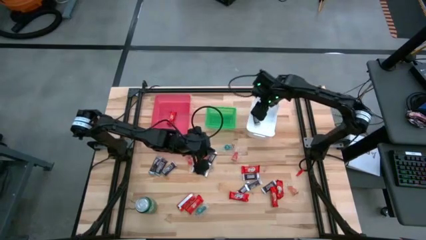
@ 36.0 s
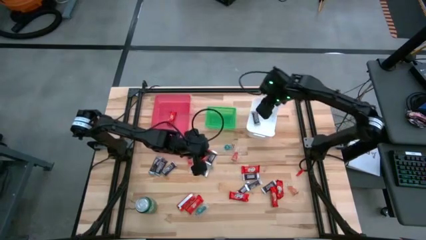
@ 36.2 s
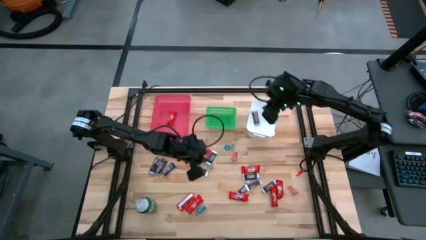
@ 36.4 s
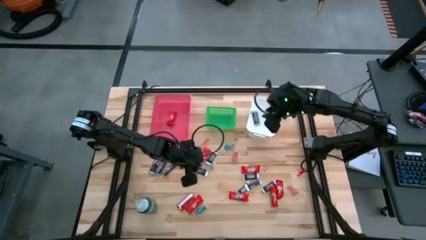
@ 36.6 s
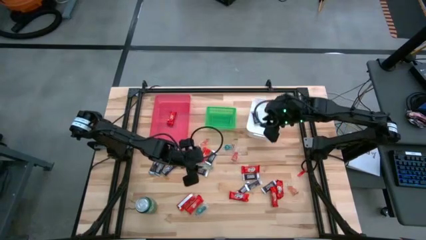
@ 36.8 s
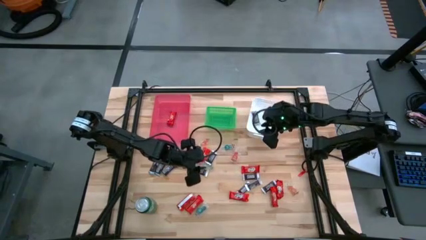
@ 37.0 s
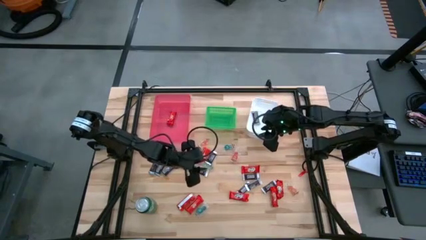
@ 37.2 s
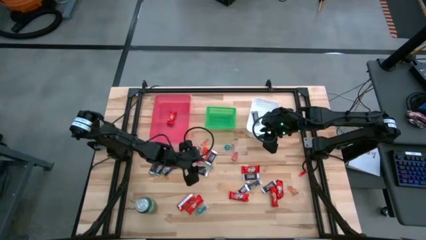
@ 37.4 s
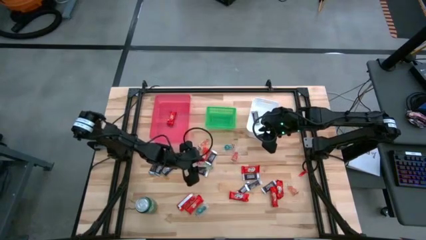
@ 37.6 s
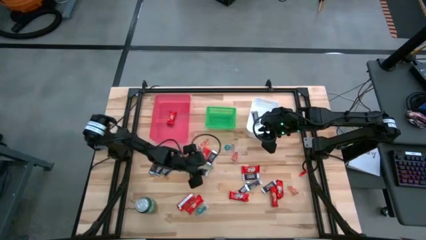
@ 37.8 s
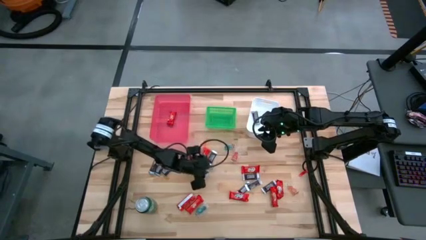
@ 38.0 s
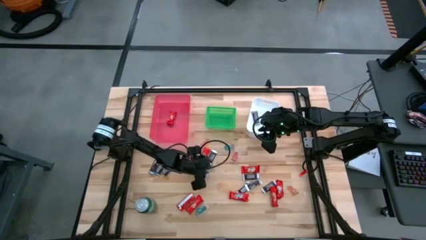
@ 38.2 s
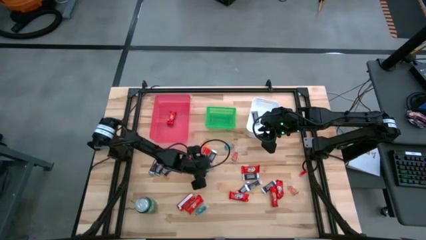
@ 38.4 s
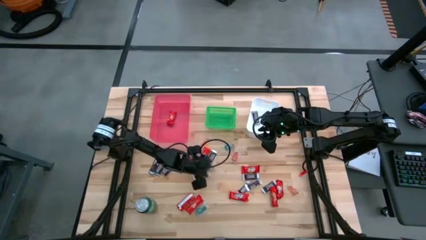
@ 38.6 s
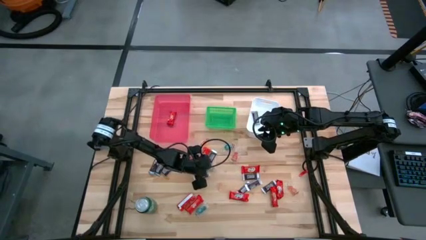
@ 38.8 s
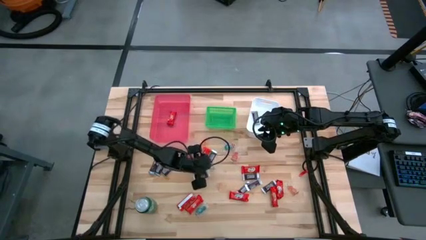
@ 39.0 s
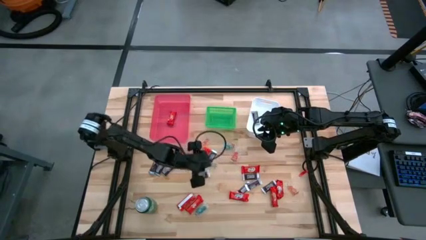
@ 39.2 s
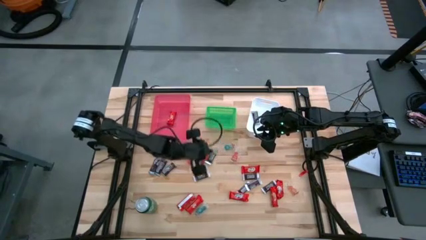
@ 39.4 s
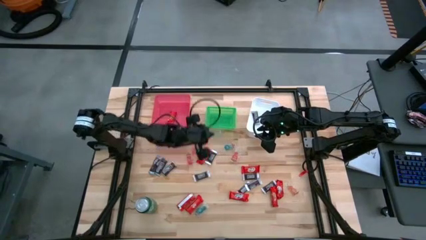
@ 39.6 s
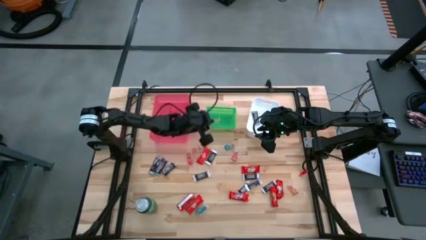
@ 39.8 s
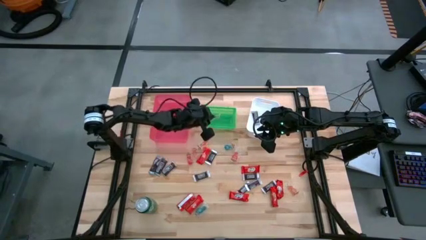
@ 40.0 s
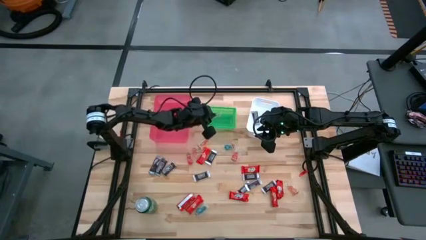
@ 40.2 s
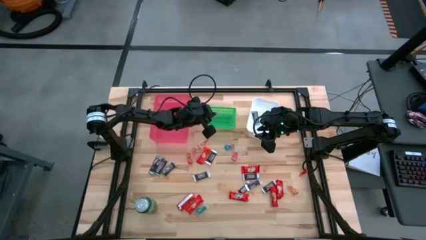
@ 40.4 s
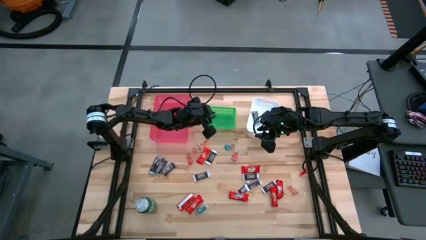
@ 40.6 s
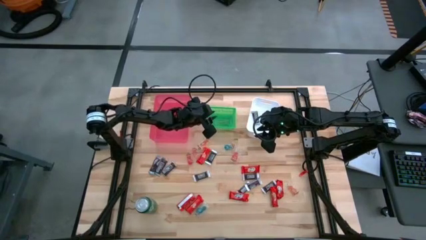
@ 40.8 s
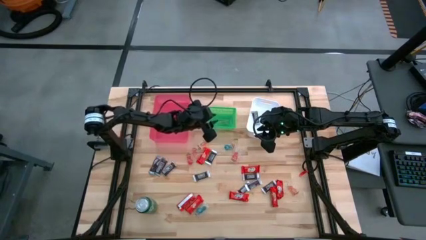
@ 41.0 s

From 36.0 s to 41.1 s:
Task: Sort candy
Put the green gummy into the green bin

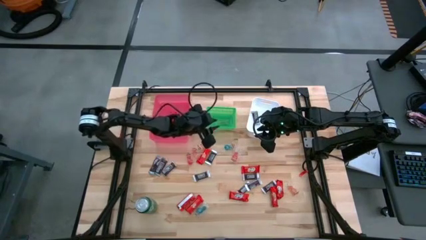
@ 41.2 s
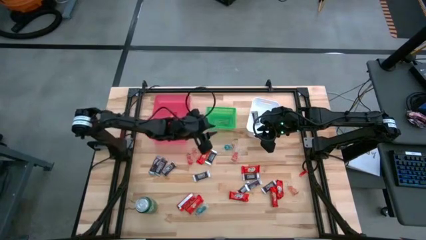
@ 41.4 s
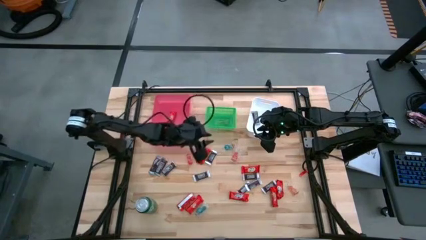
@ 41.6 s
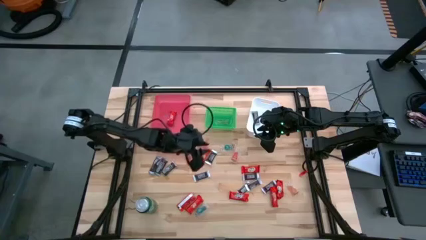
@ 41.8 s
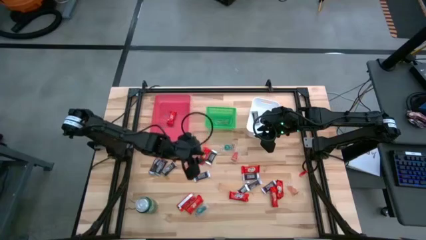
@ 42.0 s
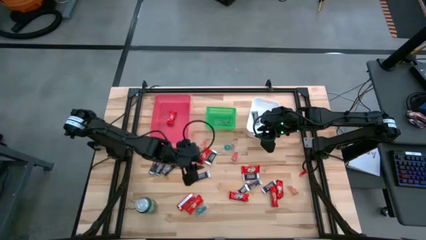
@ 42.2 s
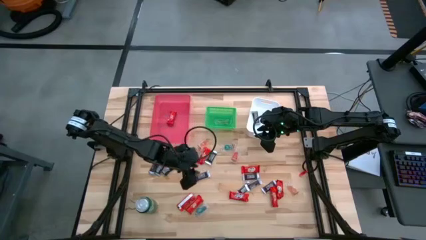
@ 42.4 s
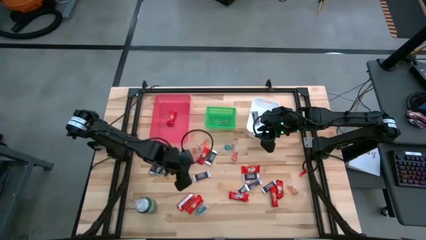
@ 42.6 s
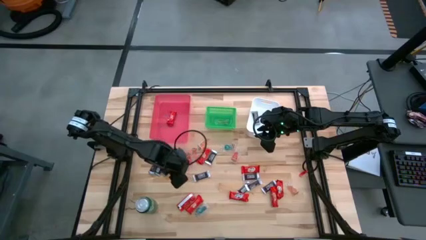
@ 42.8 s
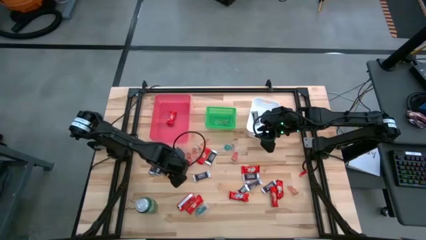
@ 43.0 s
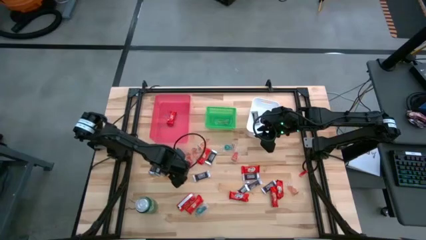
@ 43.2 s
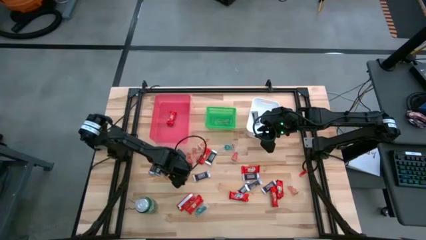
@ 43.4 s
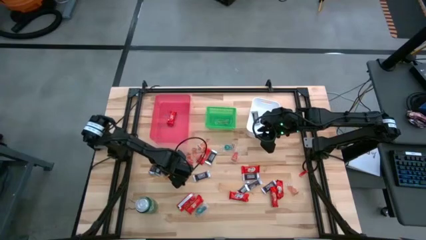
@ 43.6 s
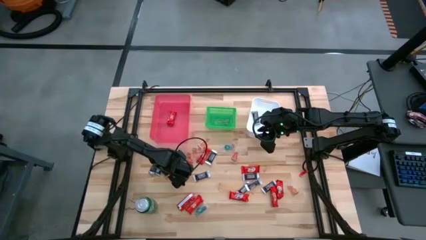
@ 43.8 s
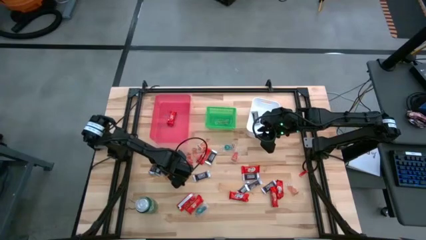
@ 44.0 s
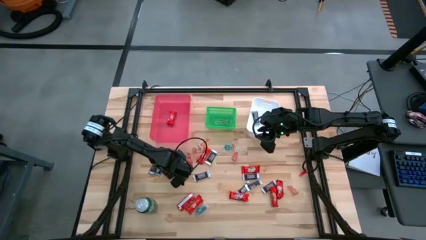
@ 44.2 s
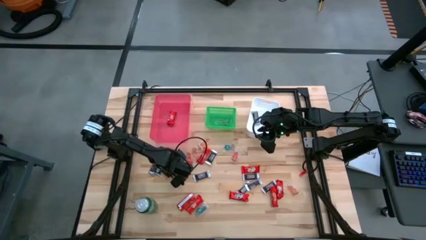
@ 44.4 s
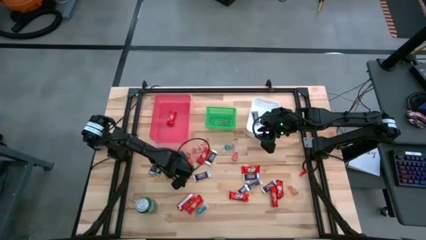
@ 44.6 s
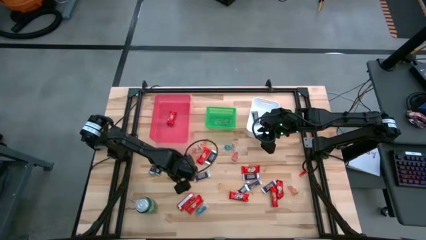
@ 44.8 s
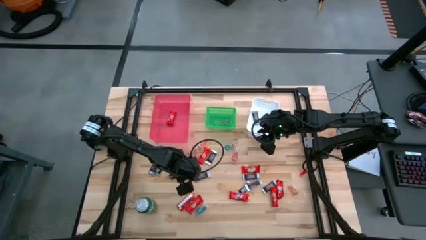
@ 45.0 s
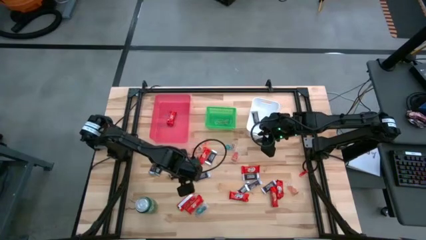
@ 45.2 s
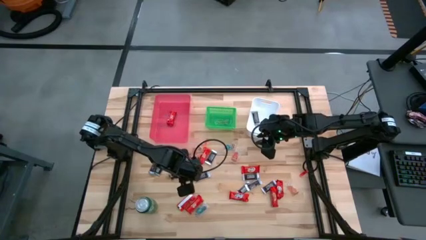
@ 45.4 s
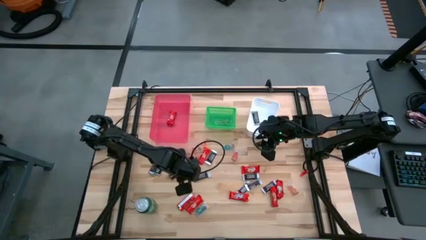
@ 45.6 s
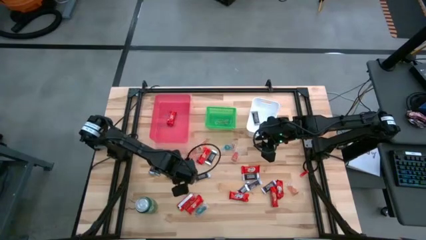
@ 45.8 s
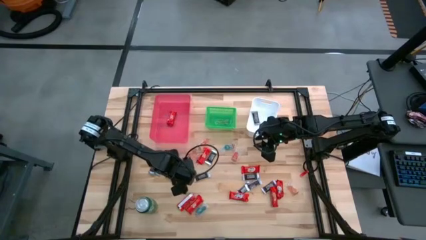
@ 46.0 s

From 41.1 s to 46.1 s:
Put the brown chocolate bar into the white bin

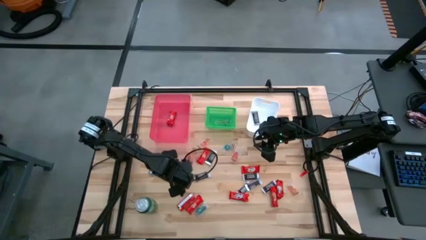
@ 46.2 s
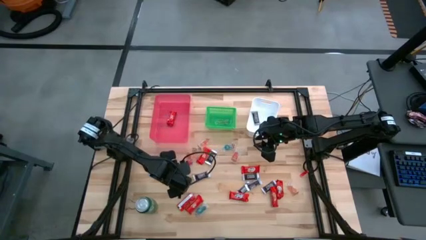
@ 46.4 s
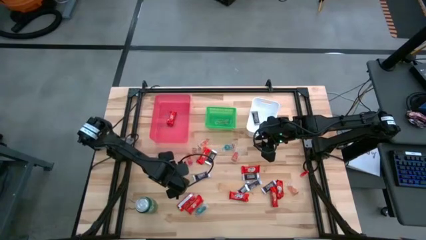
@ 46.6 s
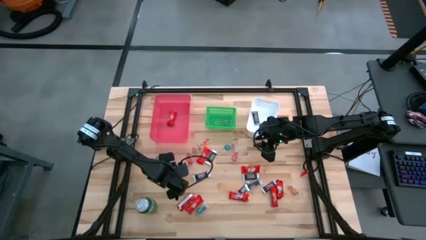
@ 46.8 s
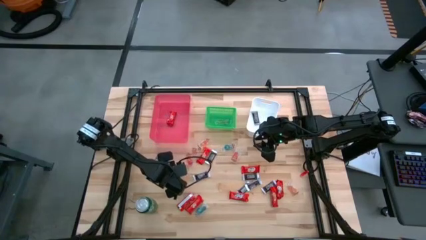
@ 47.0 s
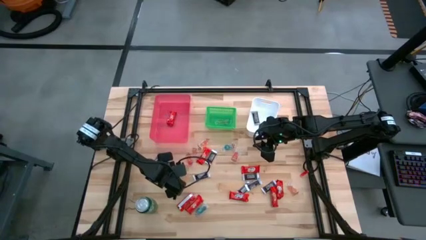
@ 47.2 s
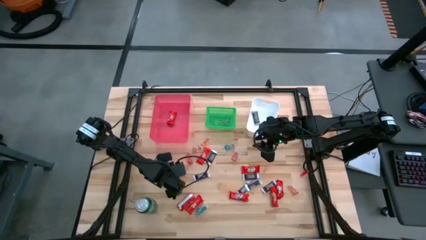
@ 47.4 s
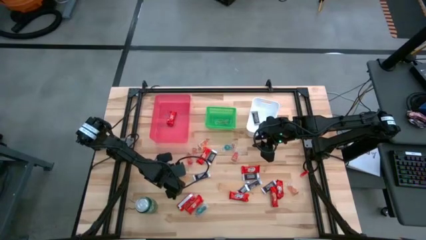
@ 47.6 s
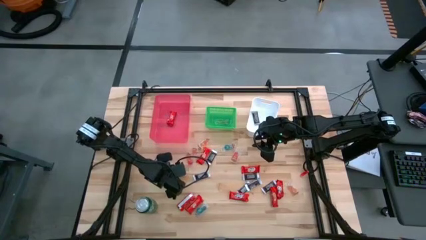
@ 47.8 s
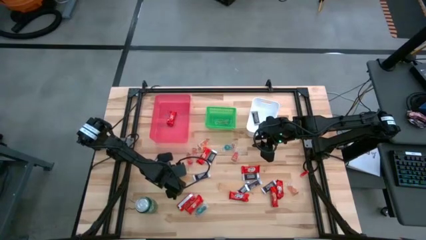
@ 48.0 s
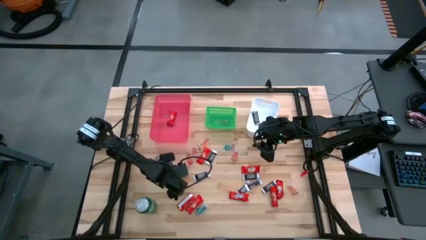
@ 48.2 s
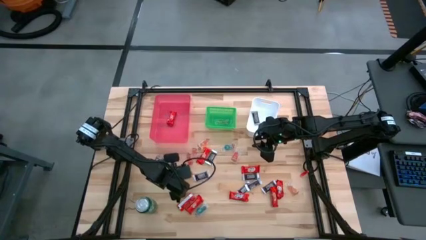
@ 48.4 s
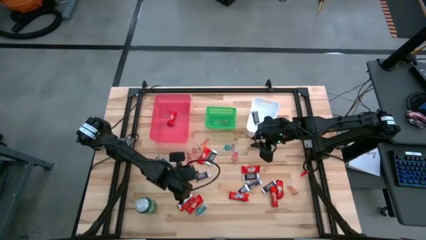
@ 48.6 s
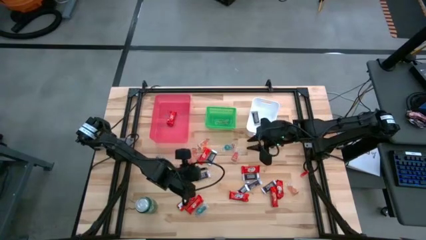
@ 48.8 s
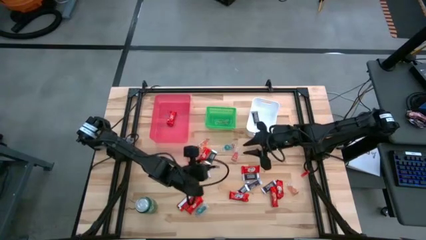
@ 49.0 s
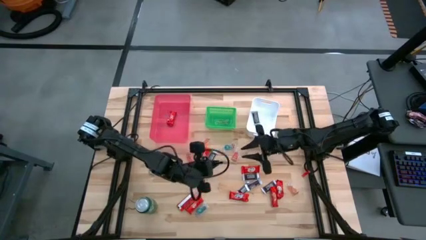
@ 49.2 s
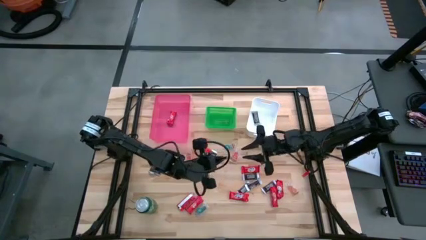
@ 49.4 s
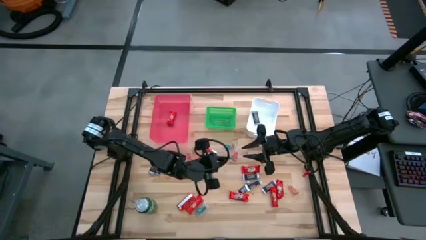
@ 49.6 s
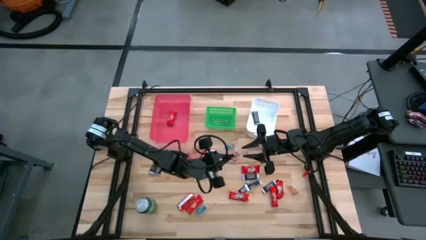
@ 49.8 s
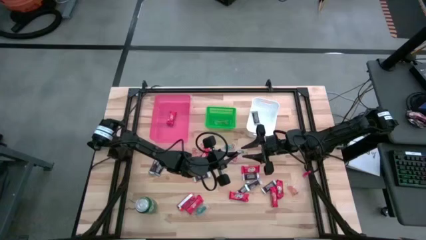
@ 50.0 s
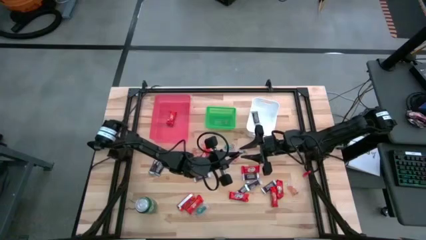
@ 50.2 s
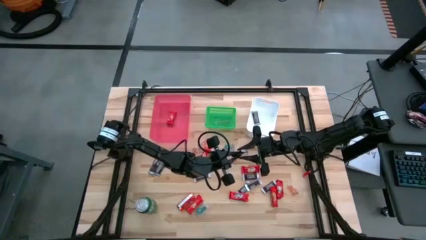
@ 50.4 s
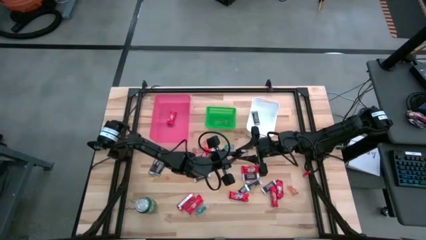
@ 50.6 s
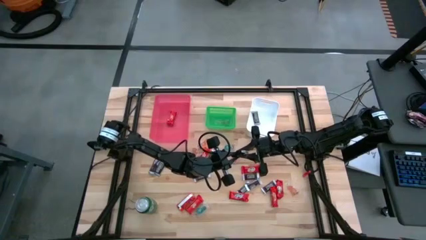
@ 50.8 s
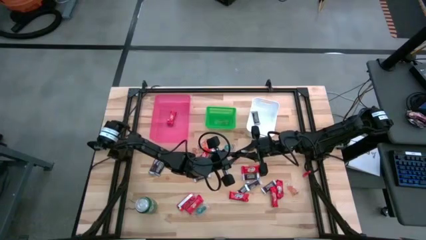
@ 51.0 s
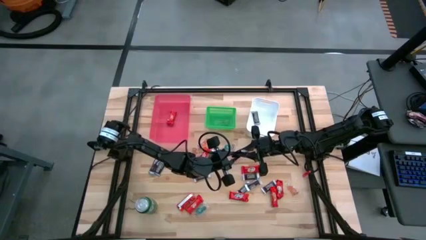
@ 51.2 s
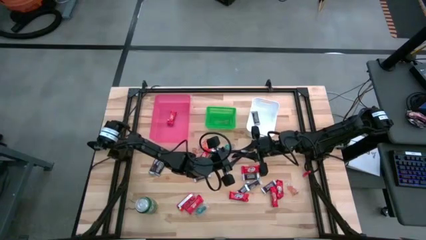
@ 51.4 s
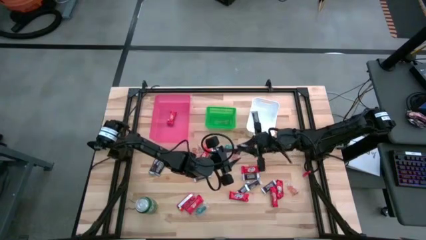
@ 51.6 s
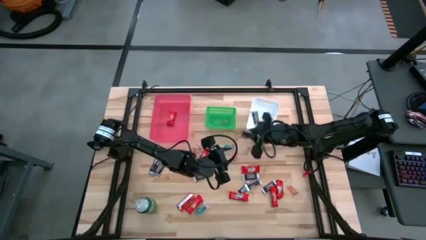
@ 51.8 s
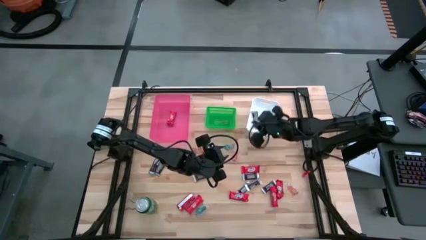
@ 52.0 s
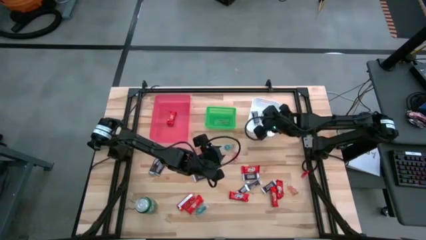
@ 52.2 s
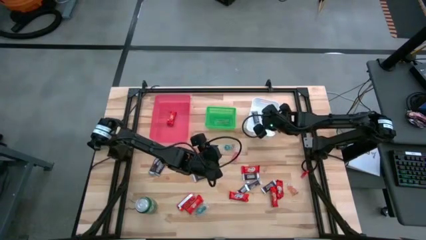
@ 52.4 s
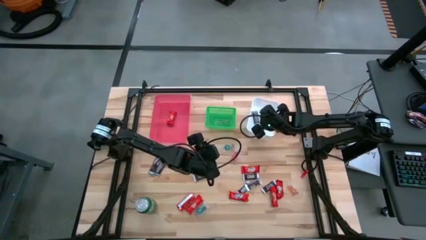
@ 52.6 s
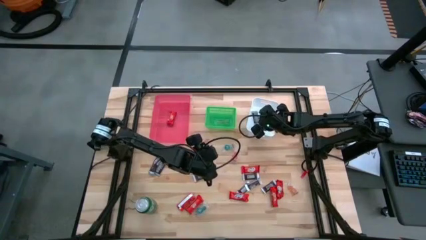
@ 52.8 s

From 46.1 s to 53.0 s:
Put the brown chocolate bar into the white bin
